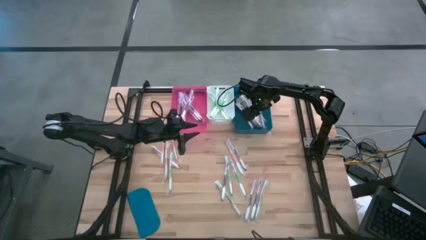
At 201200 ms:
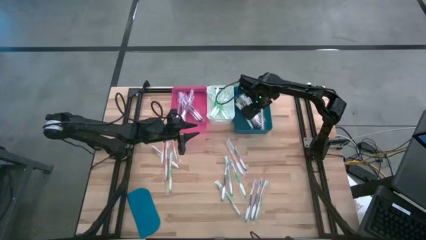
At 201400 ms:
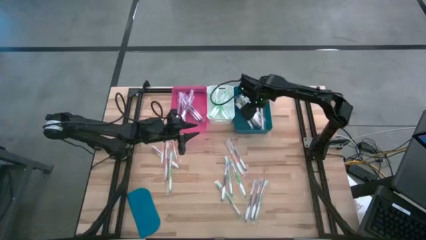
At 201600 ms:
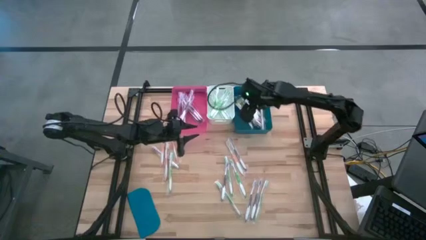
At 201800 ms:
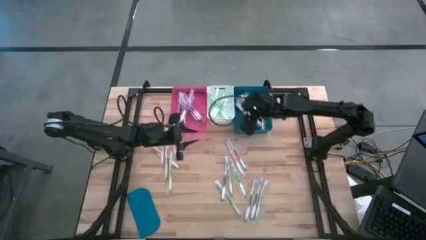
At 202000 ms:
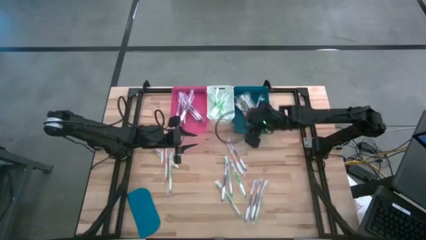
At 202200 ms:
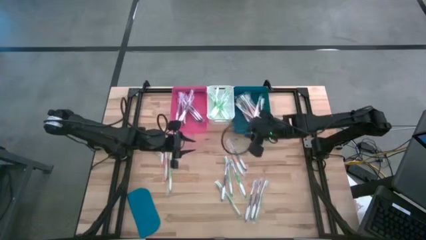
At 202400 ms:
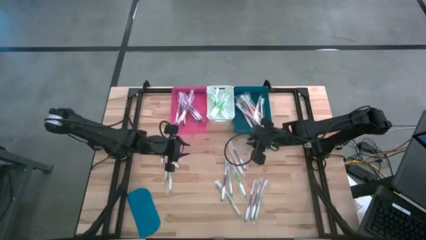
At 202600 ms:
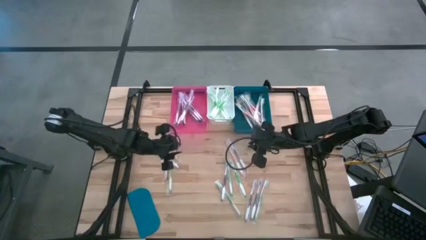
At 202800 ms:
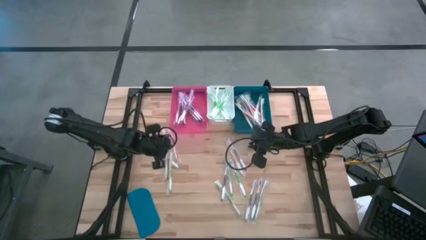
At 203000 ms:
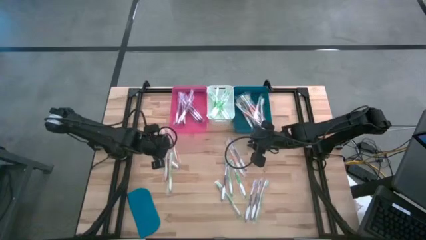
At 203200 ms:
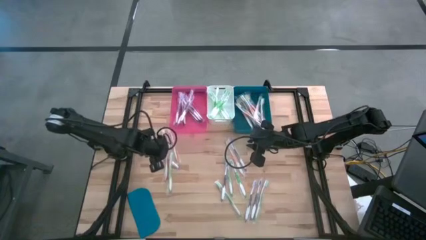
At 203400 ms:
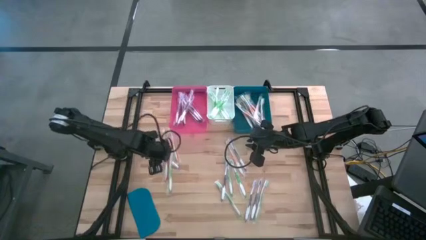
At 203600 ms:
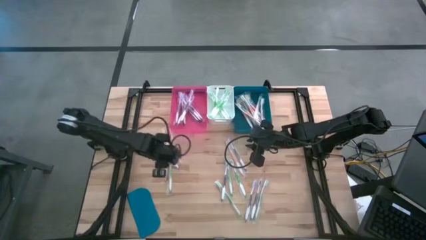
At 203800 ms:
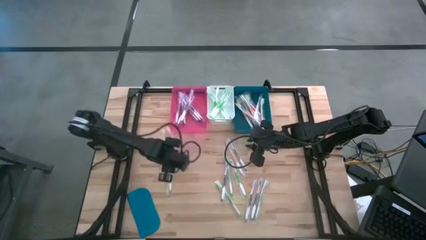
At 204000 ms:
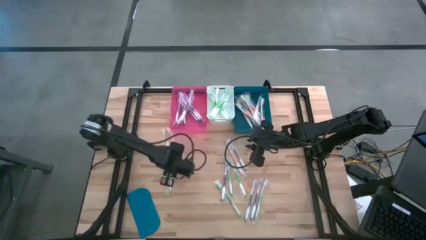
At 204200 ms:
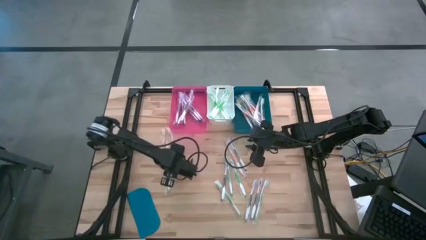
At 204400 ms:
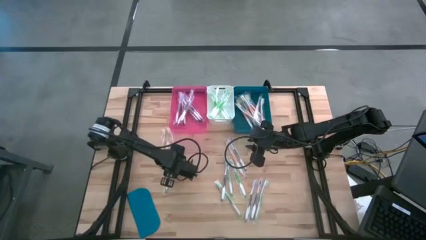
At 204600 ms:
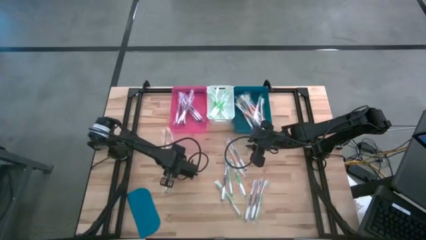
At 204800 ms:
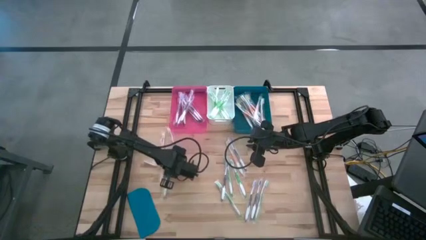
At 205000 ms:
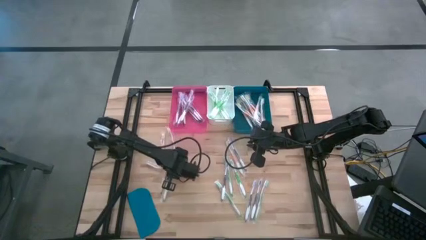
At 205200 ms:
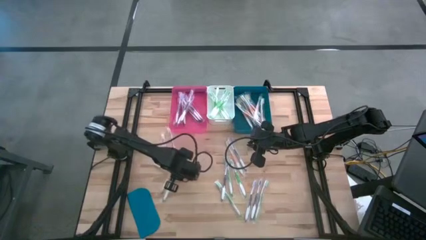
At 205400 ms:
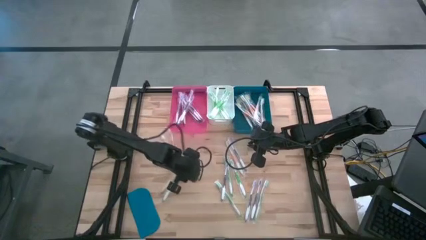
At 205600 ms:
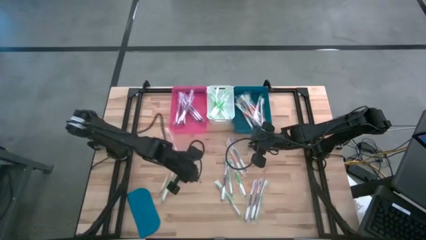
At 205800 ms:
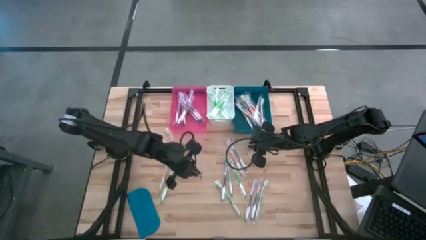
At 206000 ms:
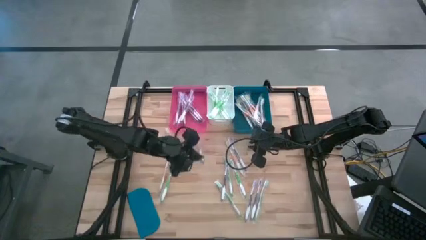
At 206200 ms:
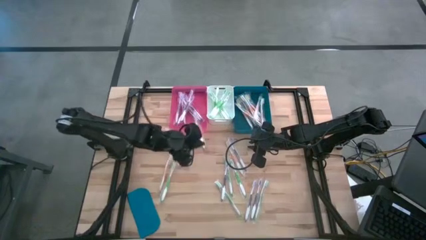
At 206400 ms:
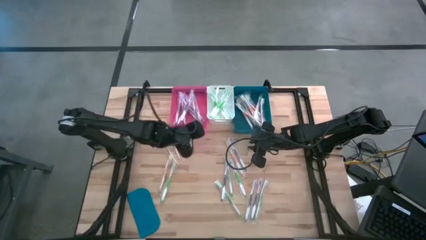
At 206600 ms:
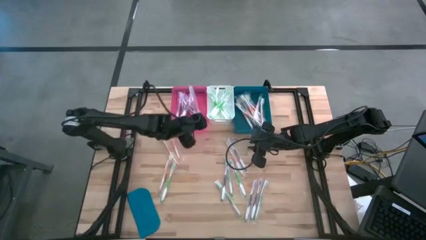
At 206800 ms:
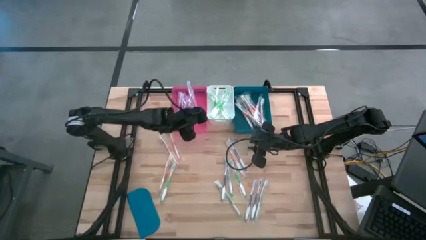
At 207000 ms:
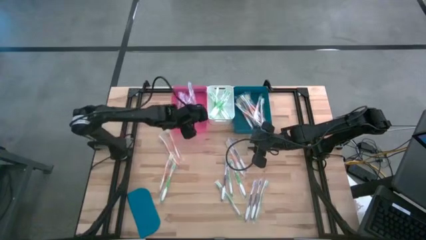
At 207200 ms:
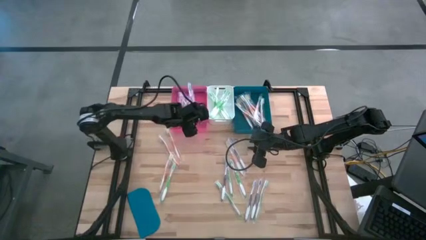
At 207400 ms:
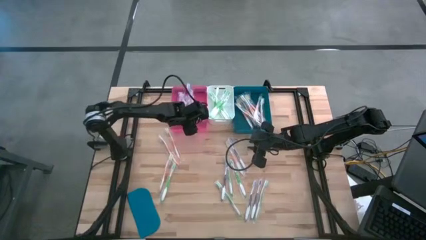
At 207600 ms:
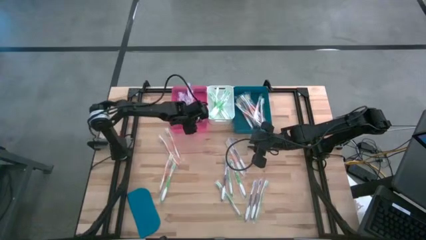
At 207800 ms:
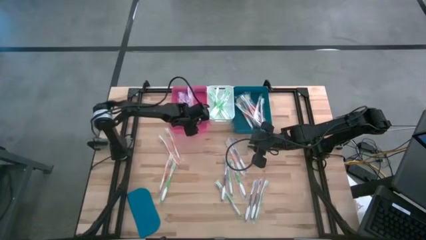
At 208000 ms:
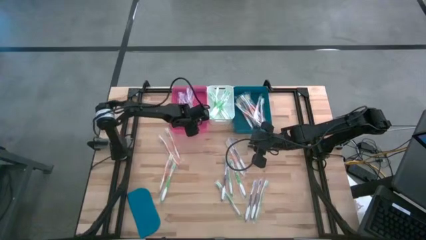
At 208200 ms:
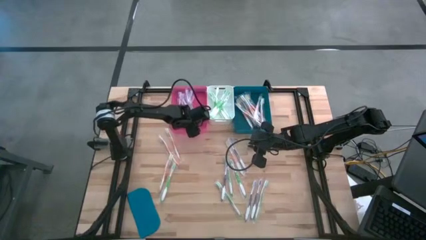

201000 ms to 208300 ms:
Task: Pick & Place Toothbrushes
Put the violet toothbrush into the pink bin

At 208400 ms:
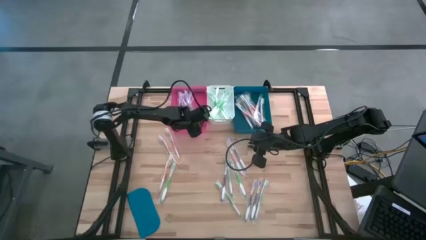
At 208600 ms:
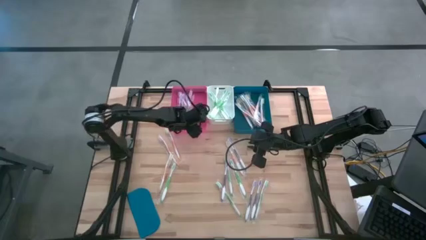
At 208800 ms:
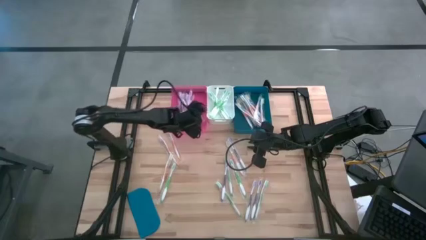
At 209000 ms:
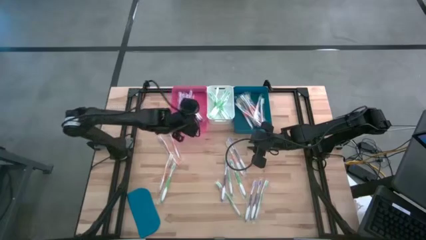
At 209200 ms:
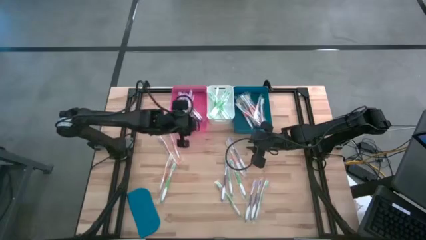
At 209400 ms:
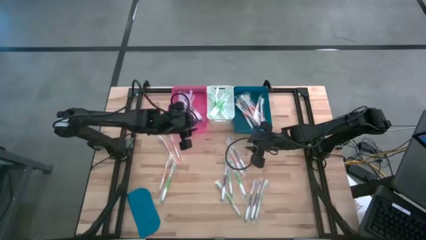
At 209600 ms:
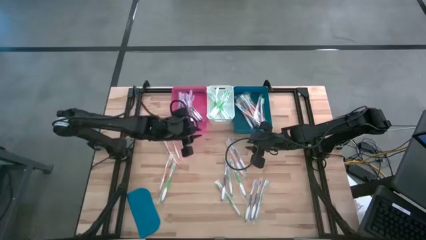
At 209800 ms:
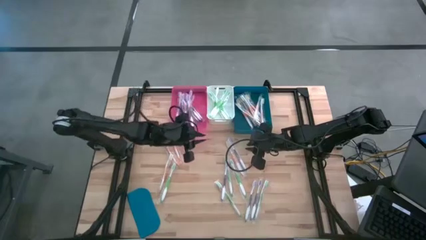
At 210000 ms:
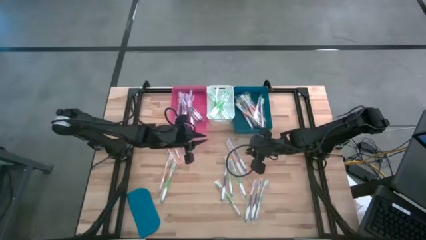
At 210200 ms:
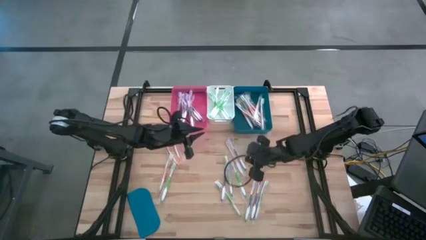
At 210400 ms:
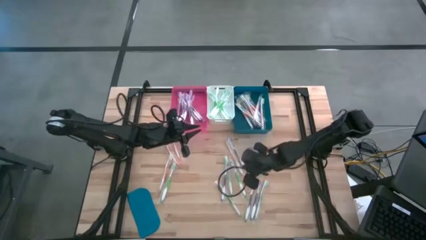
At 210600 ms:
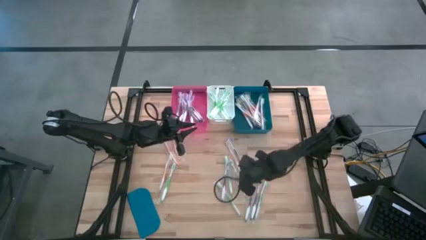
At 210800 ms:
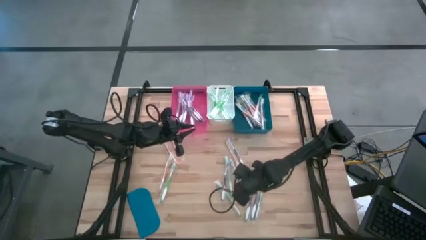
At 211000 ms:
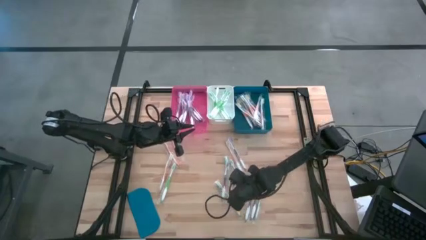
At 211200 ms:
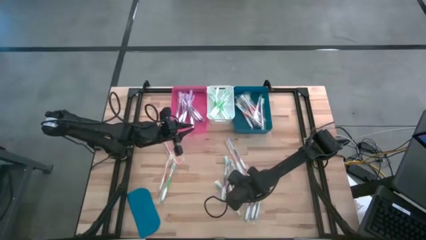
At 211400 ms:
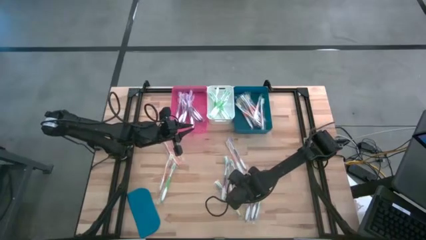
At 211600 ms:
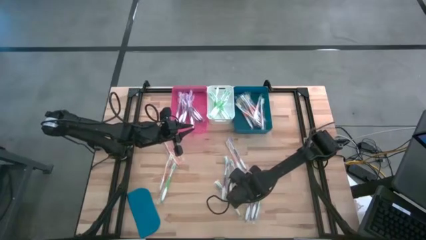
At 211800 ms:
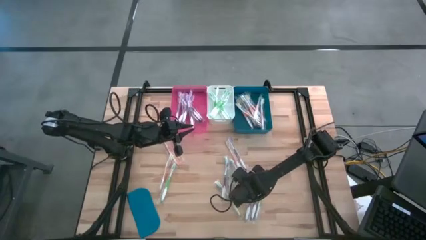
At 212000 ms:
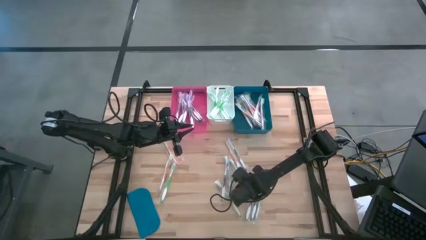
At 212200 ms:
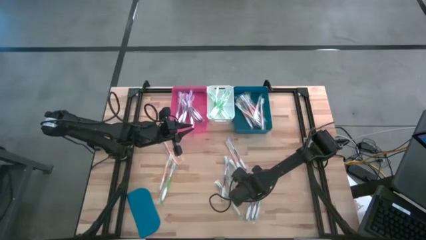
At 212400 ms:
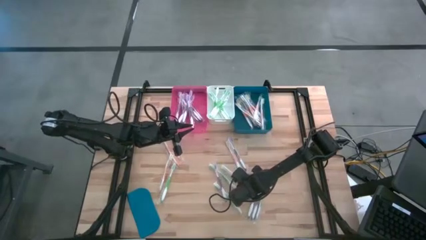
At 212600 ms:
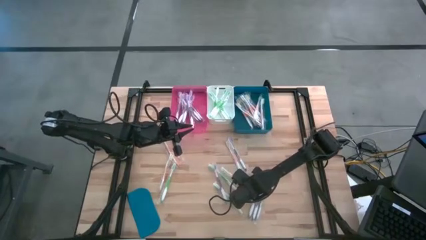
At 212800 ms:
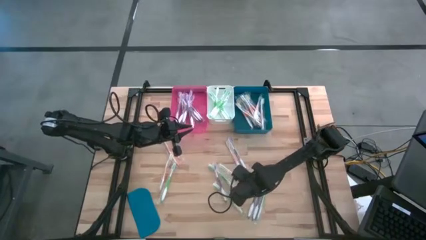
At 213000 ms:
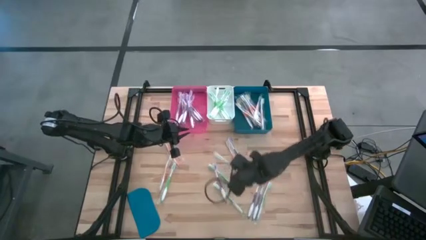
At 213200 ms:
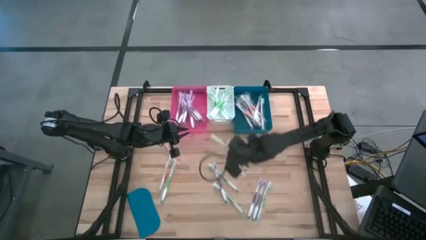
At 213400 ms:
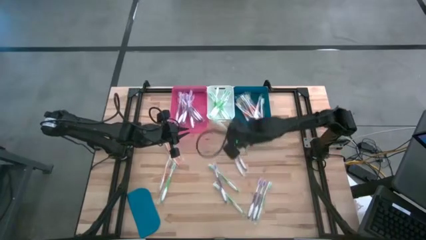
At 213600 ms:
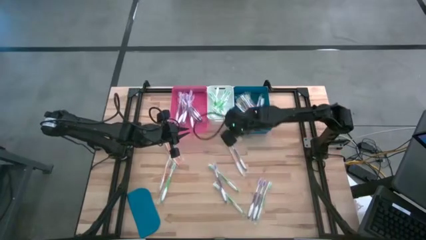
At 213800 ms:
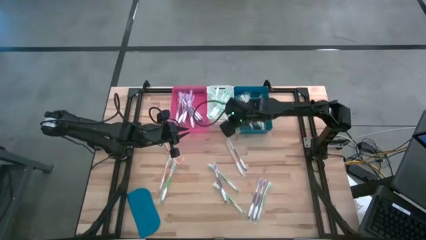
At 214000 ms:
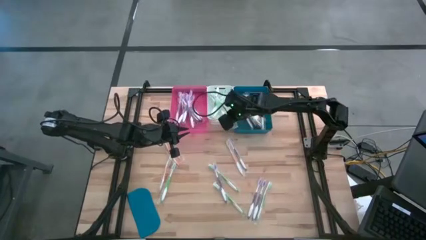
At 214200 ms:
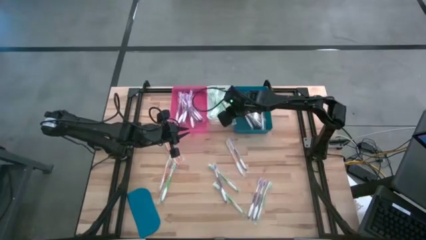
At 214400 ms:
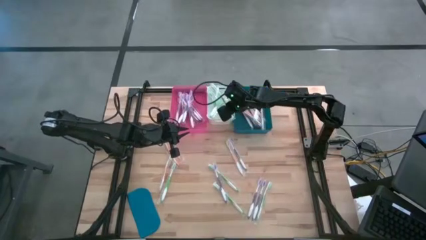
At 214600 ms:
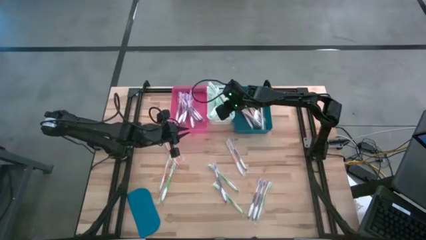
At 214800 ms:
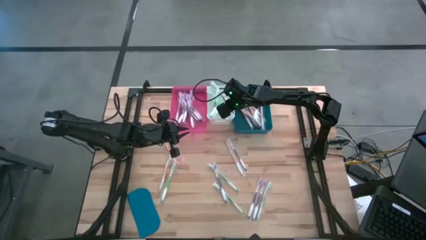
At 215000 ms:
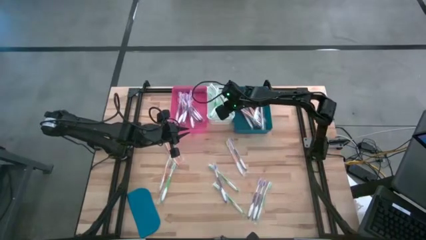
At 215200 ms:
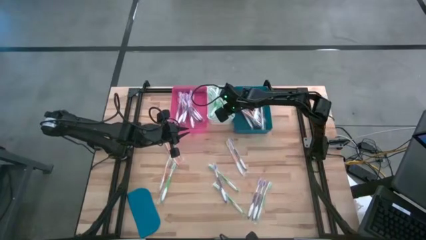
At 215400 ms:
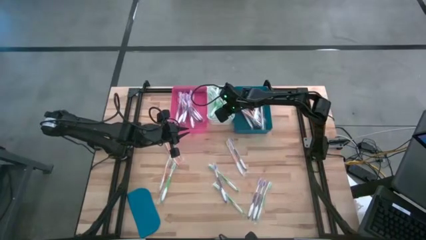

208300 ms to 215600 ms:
Put the green toothbrush into the white bin
